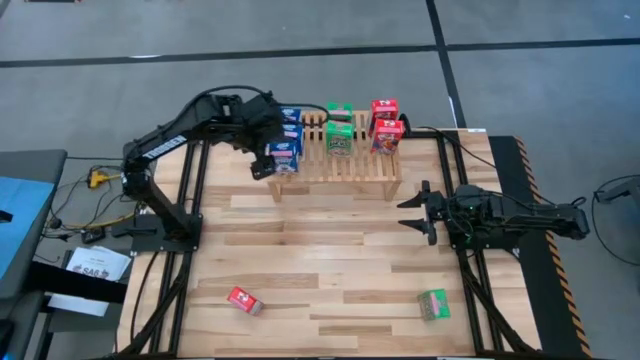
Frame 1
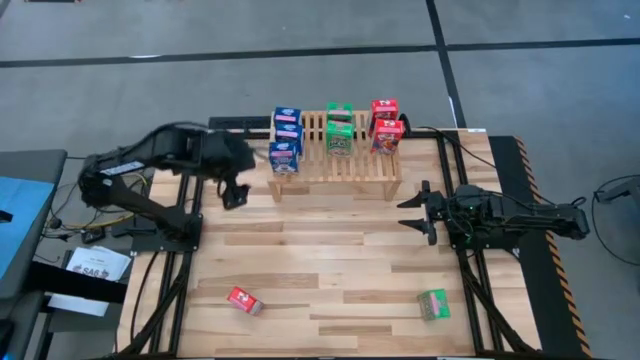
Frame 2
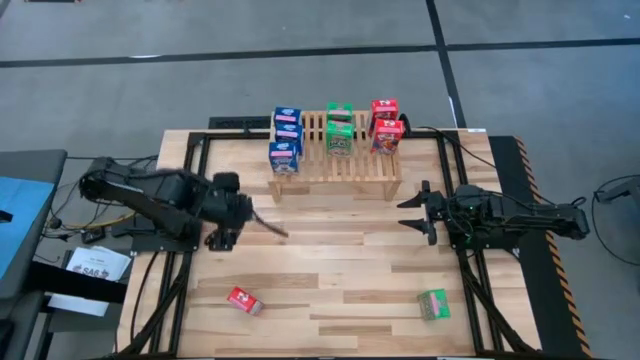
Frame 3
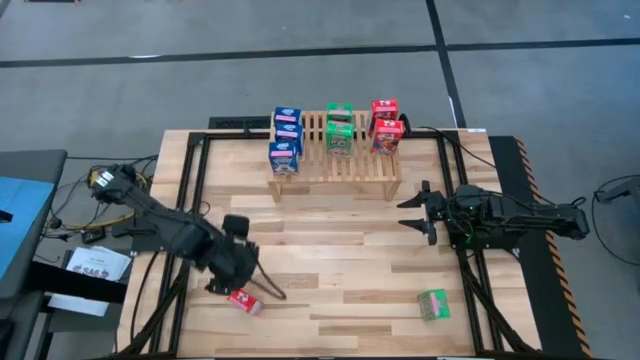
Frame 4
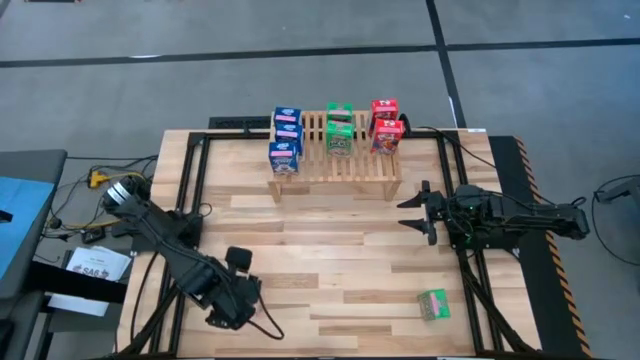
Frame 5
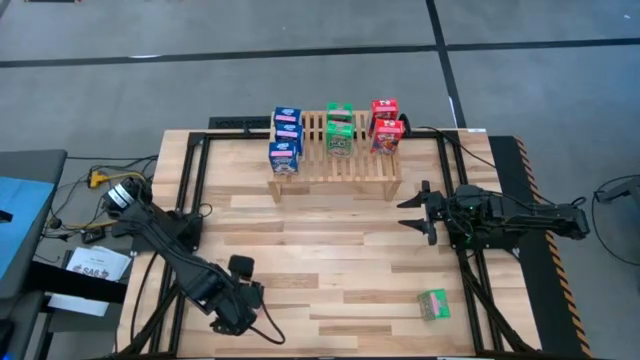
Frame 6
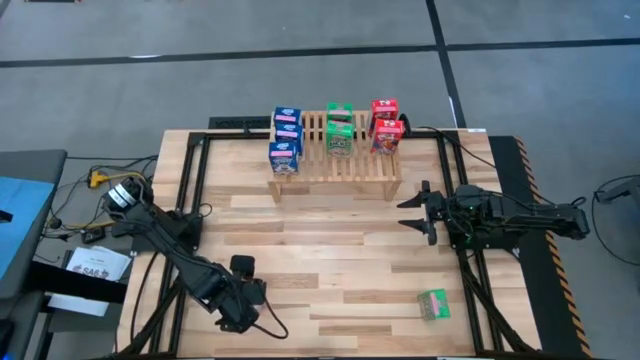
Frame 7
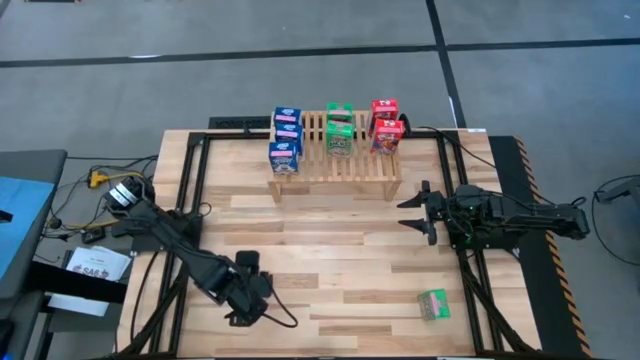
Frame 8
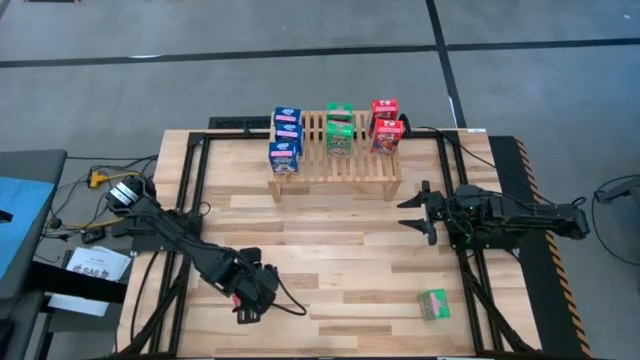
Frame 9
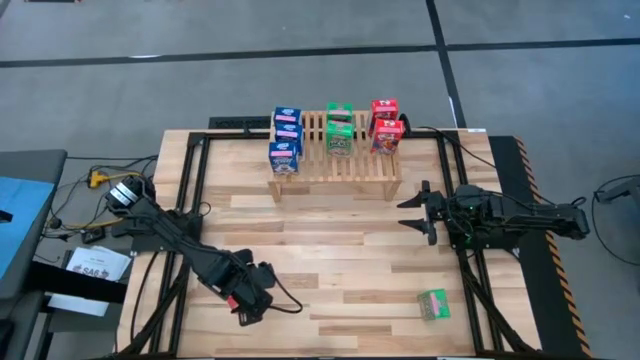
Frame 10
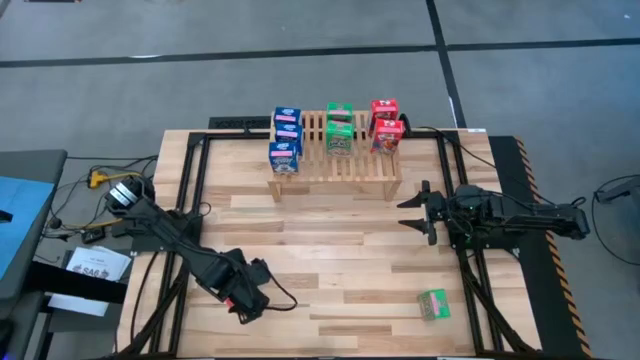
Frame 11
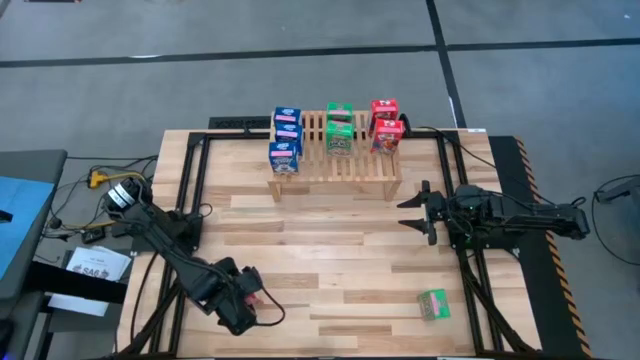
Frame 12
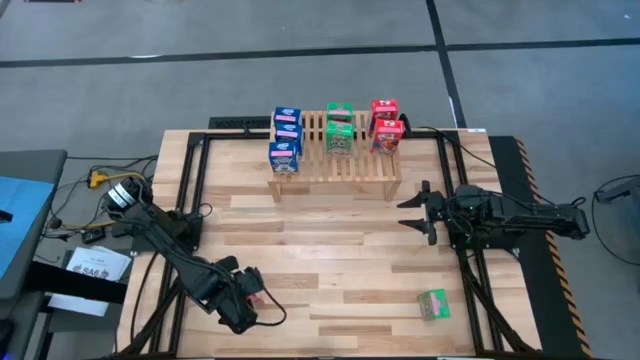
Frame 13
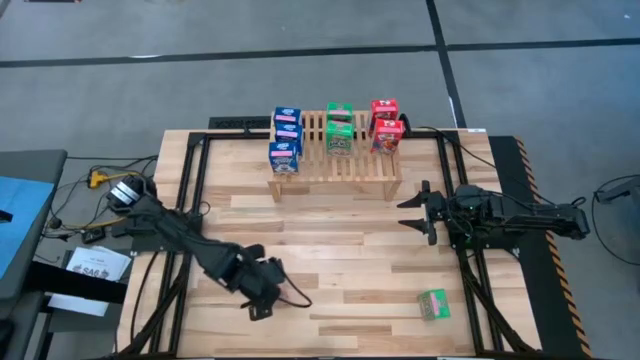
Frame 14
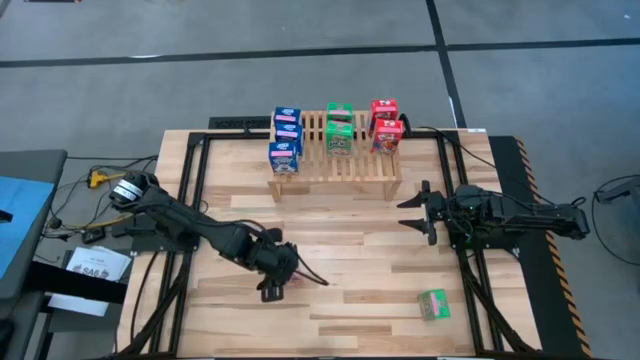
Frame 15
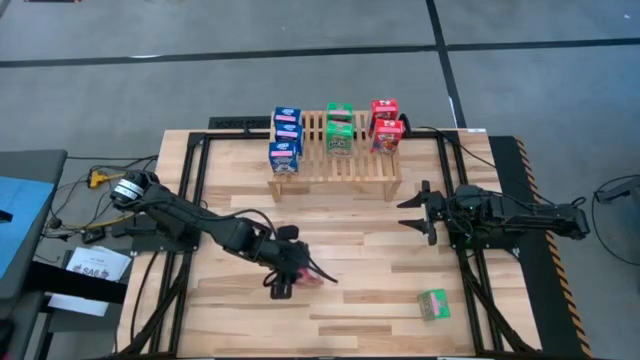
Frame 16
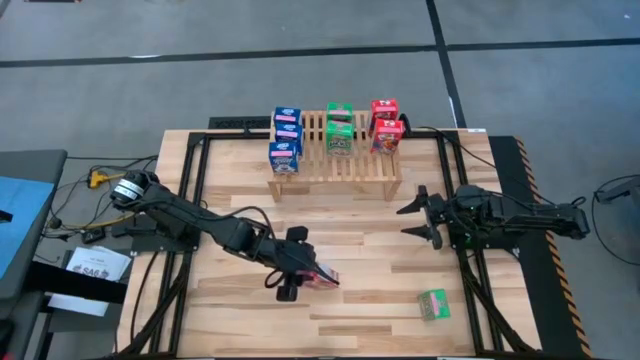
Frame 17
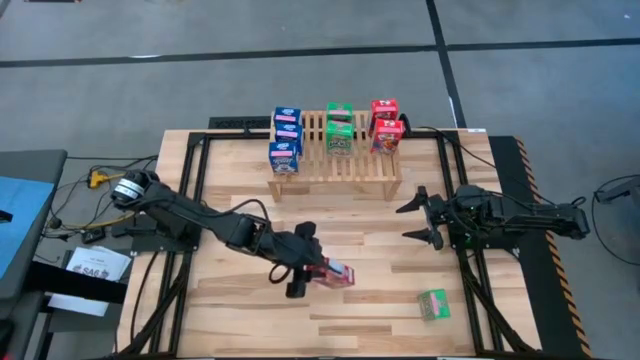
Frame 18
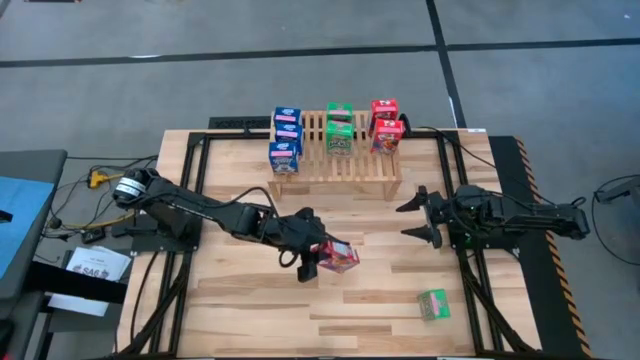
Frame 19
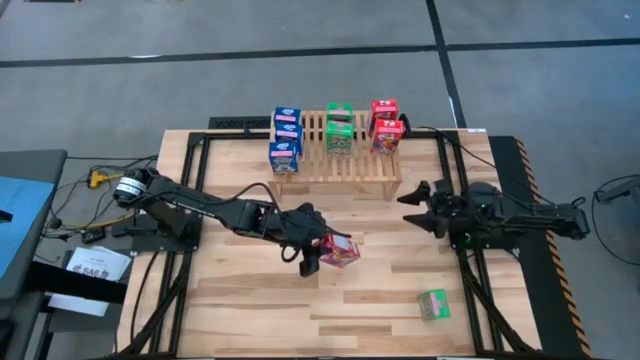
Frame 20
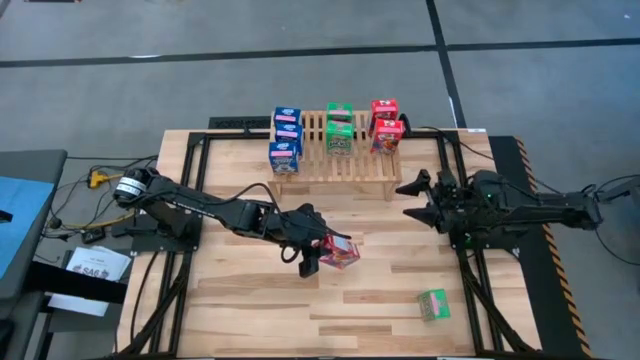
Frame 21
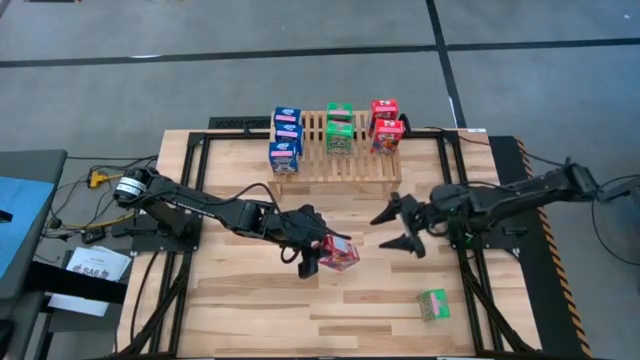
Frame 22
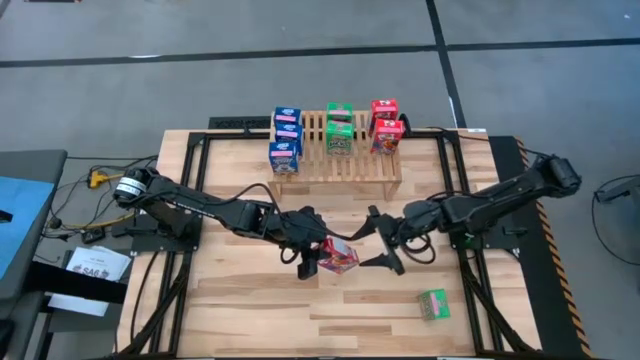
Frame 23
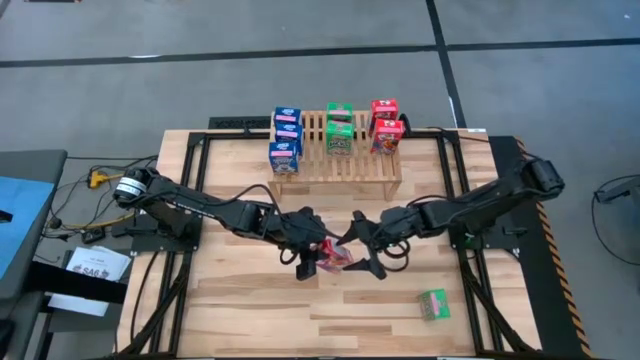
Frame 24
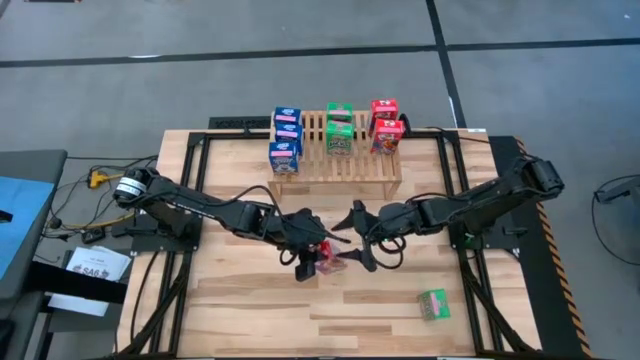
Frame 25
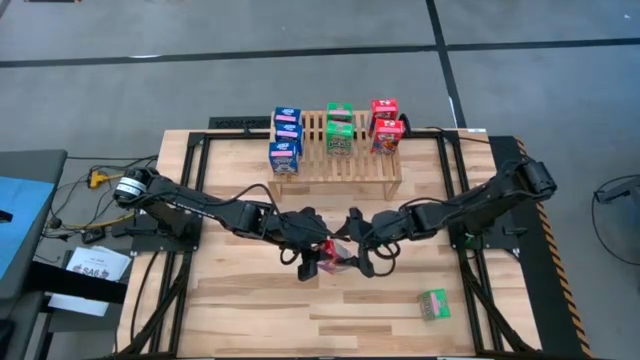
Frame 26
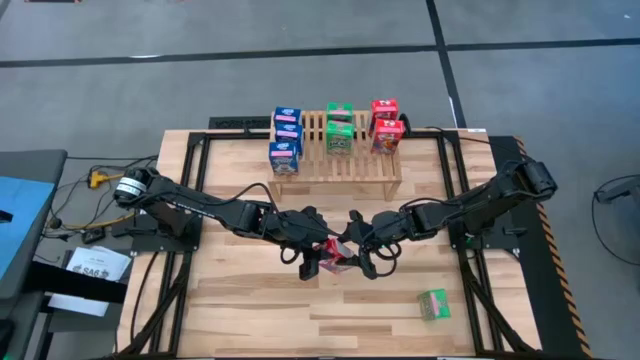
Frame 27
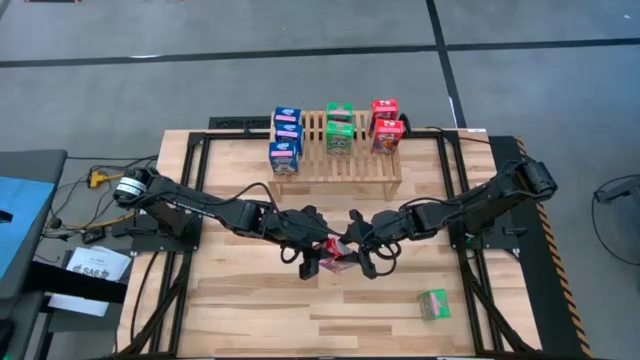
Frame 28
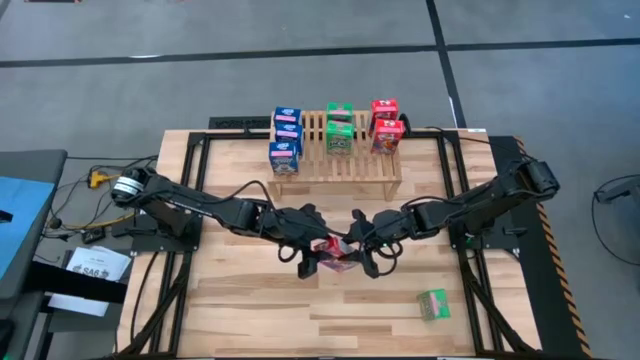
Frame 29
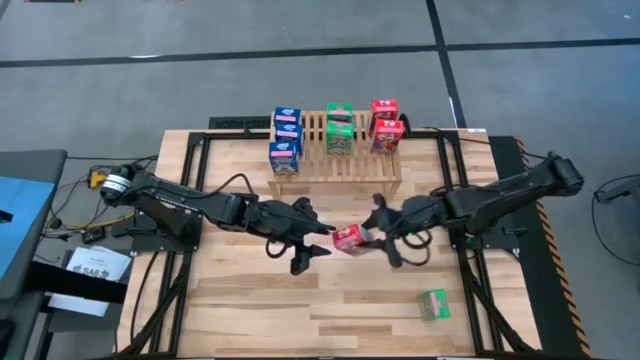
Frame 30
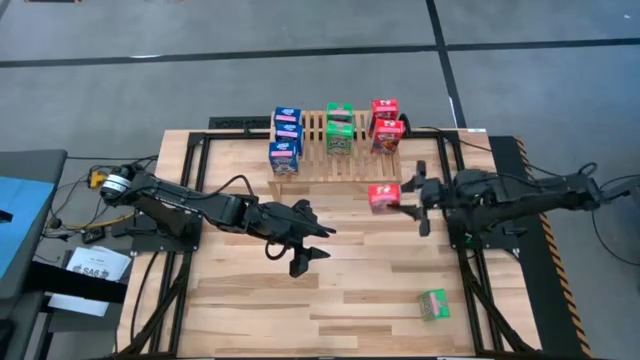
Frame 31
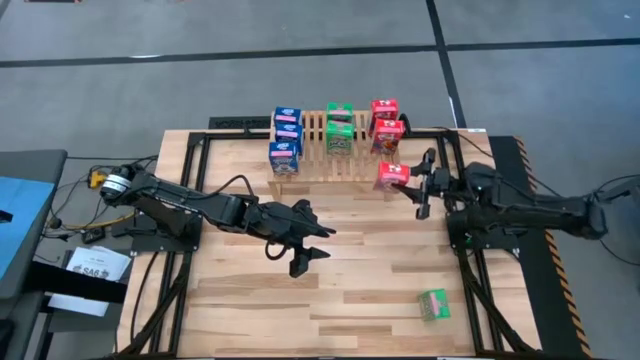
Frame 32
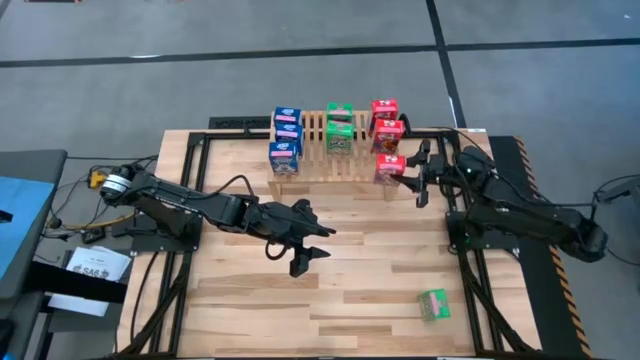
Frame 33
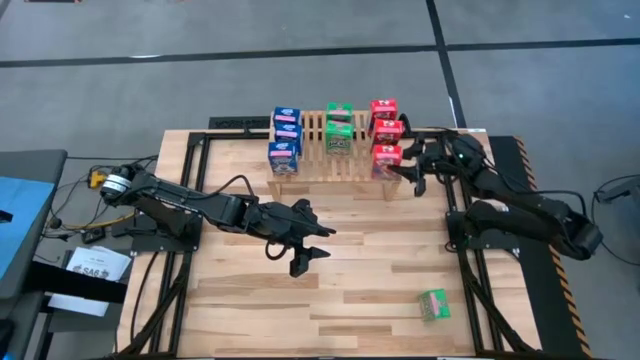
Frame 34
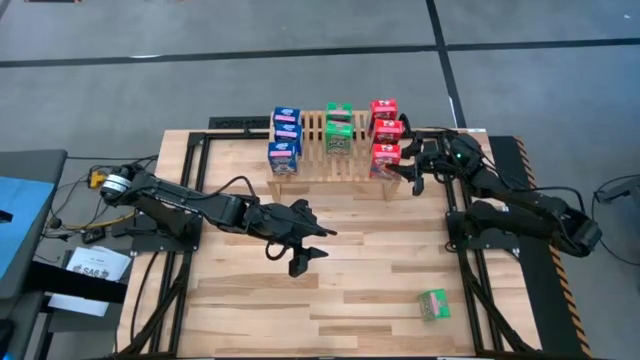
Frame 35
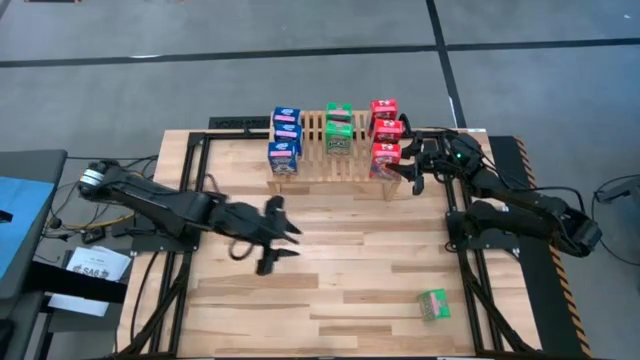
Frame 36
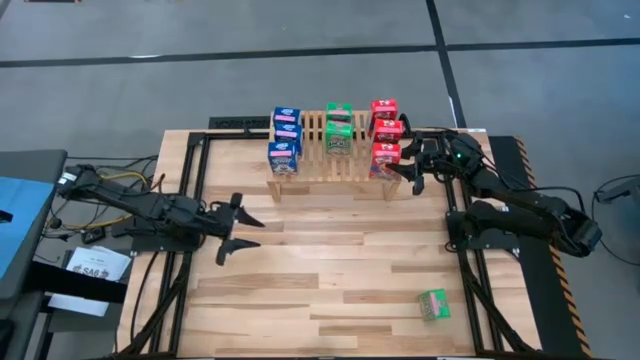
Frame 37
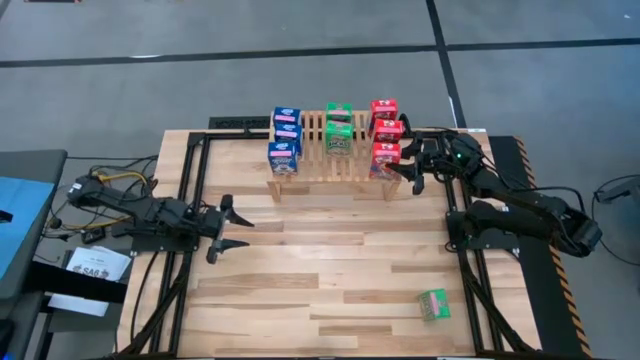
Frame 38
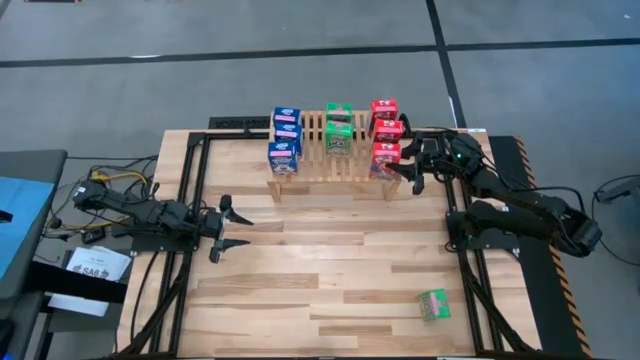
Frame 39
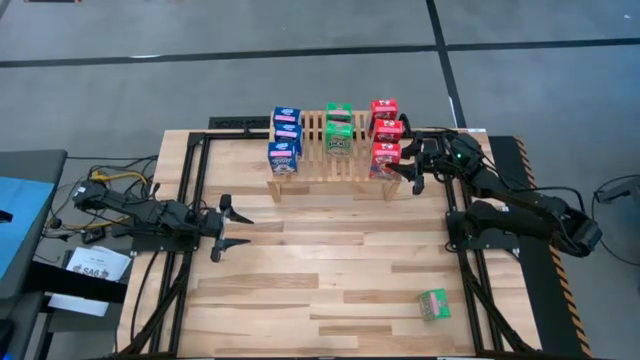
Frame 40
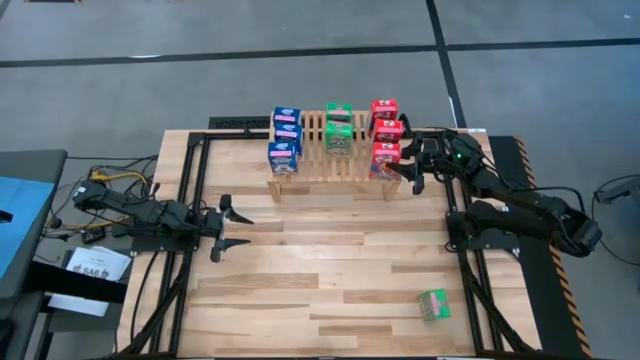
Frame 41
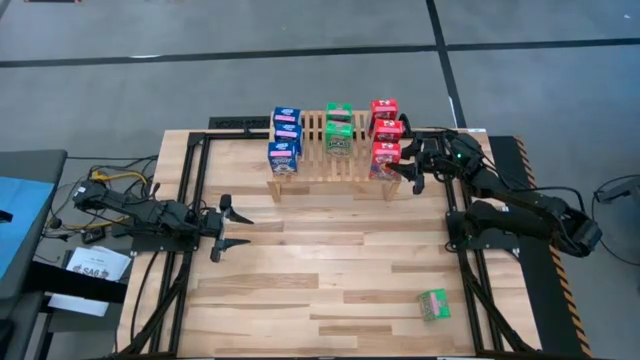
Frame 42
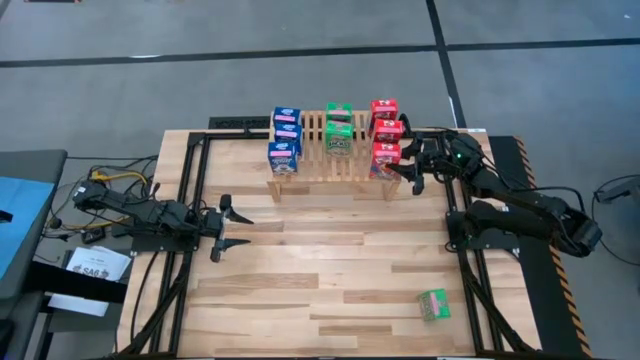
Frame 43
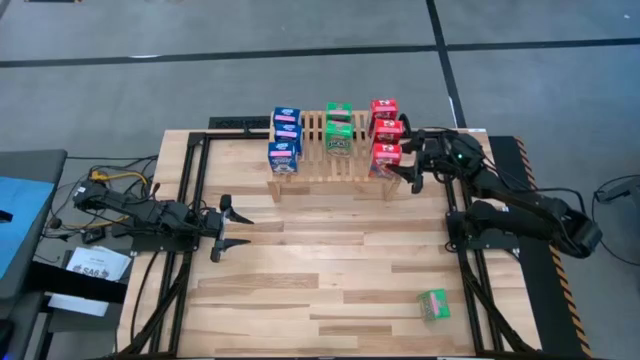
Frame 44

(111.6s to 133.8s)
Task: Stack cereal on shelf
Put the red cereal box on the shelf aligned with the other red cereal boxes
